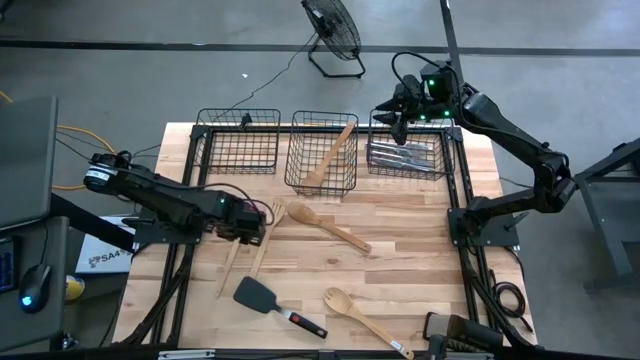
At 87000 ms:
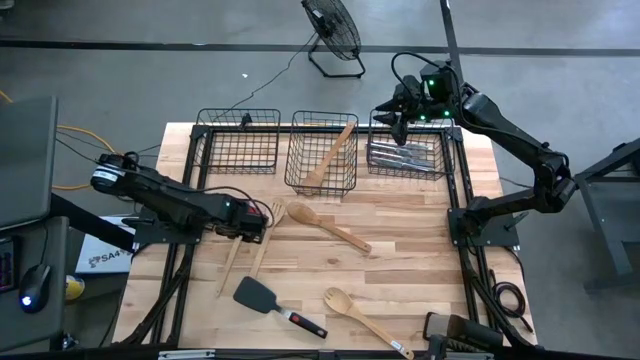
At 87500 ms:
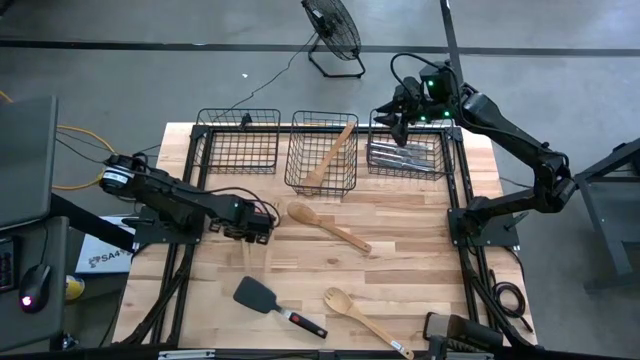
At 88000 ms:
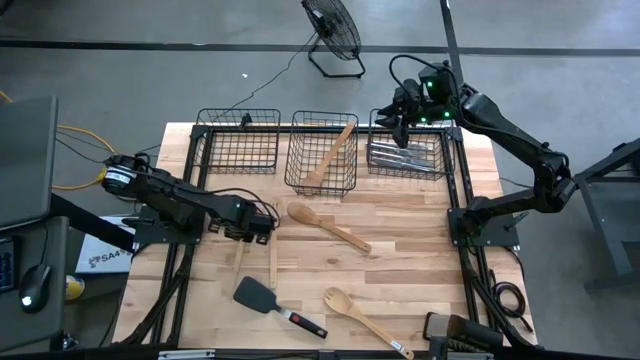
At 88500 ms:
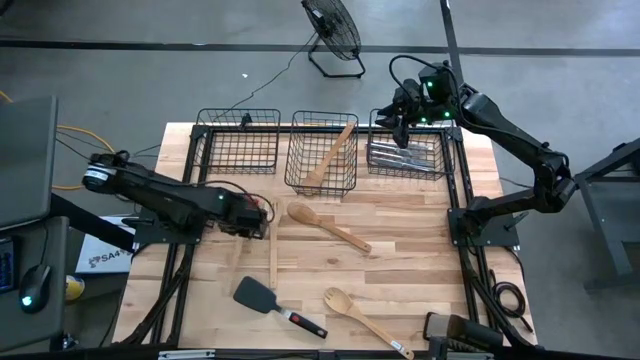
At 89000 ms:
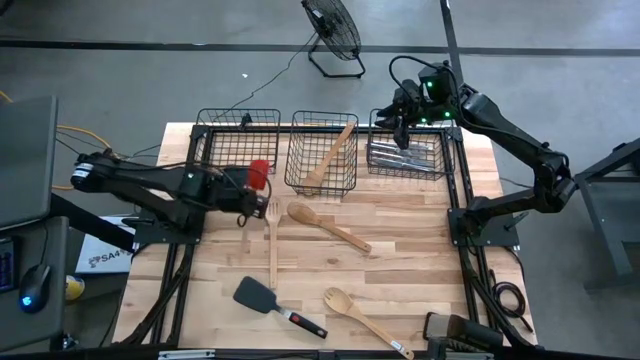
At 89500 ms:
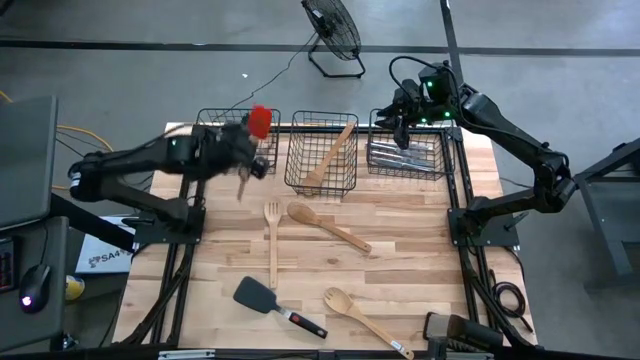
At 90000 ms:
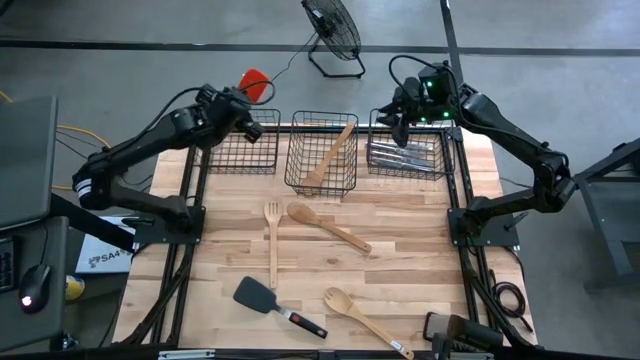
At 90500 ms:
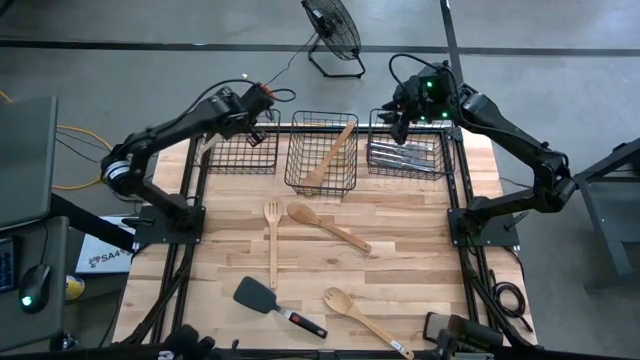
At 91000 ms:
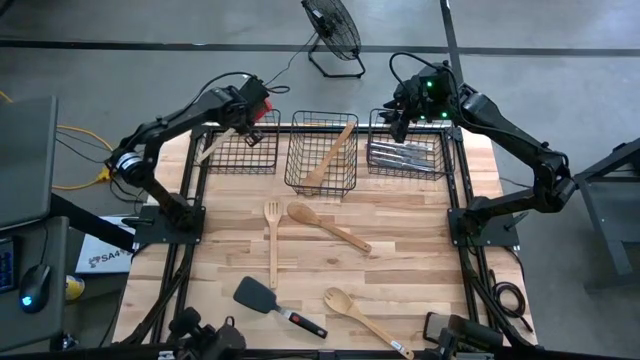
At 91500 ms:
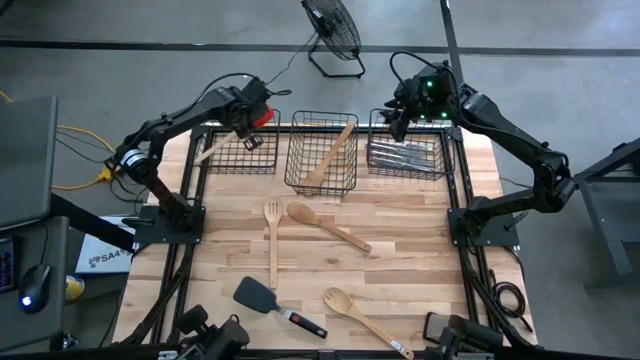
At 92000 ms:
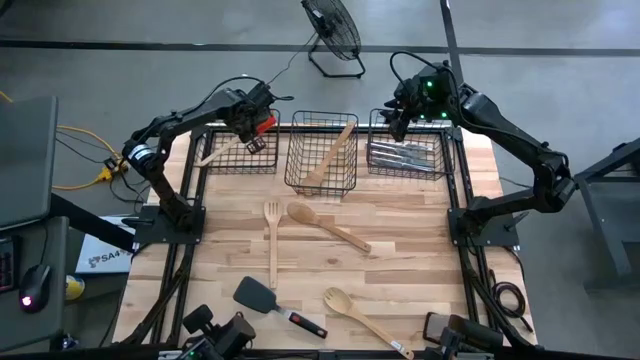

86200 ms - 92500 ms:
Task: Pick & Place Kitchen Items
Put the red spatula into the left wire basket

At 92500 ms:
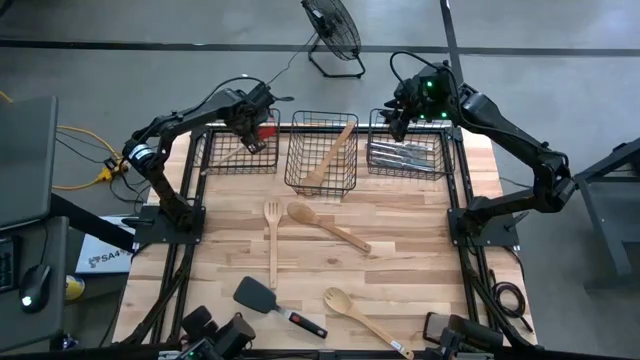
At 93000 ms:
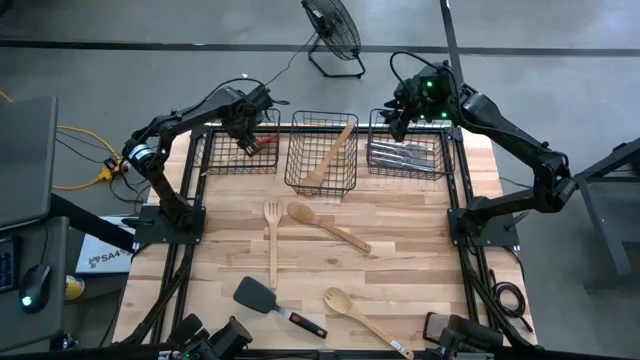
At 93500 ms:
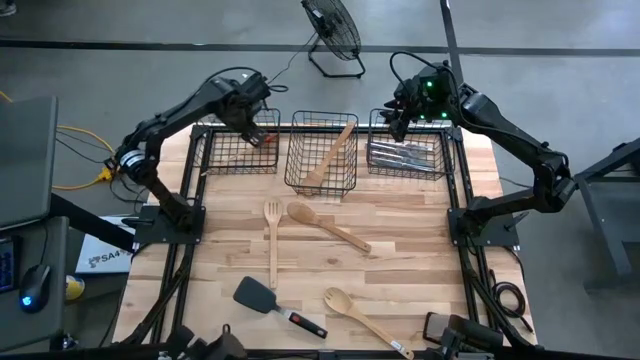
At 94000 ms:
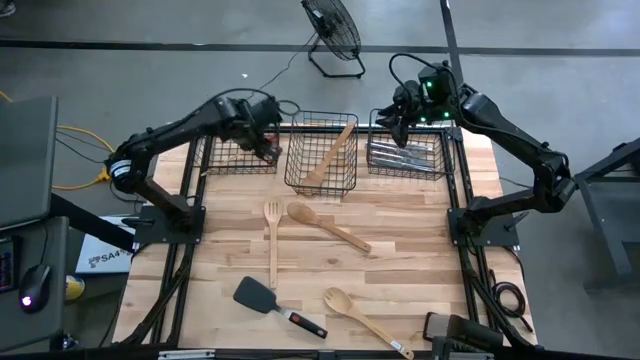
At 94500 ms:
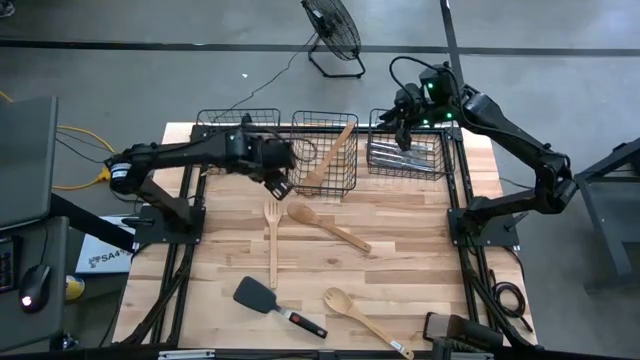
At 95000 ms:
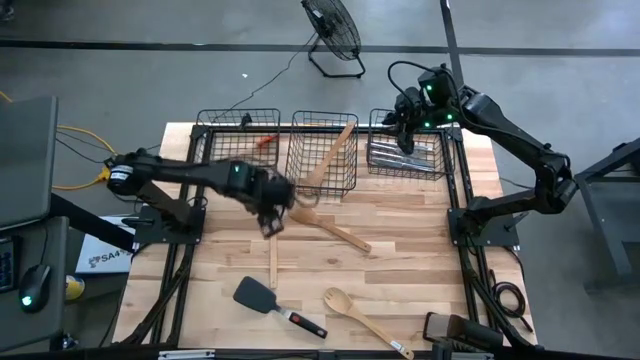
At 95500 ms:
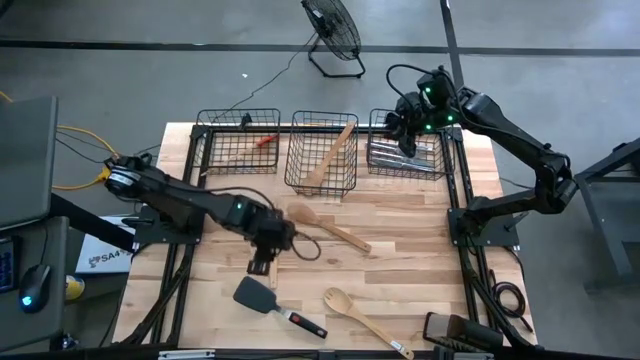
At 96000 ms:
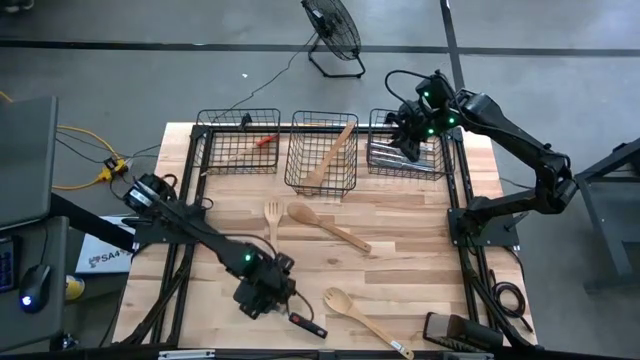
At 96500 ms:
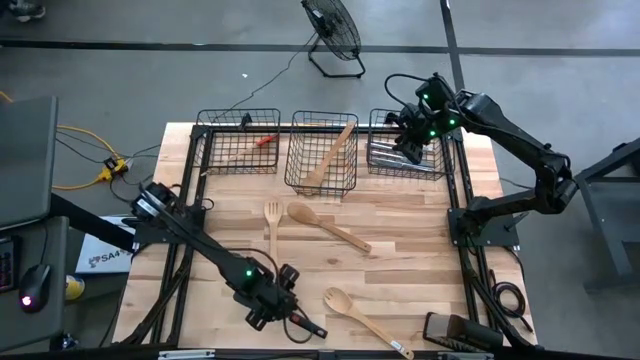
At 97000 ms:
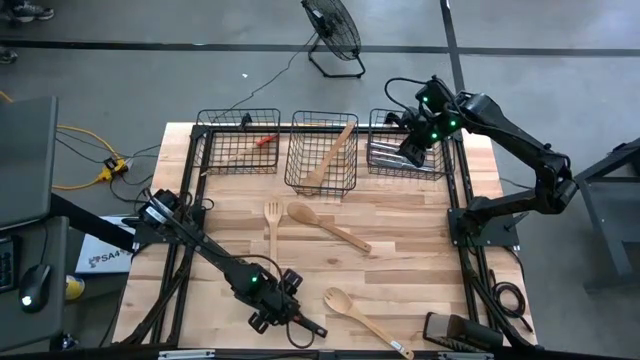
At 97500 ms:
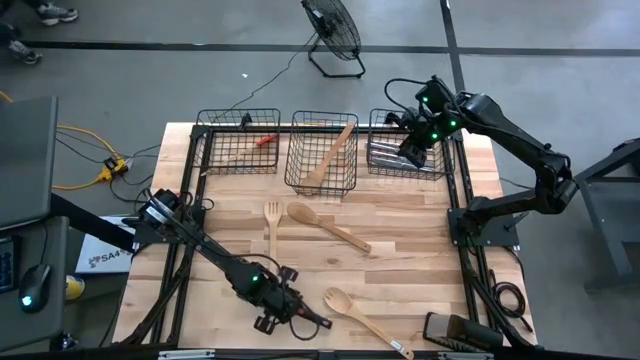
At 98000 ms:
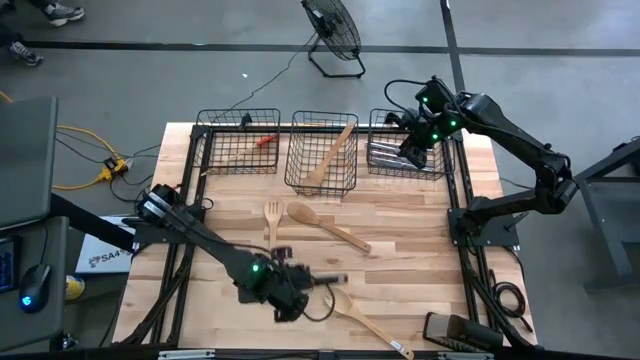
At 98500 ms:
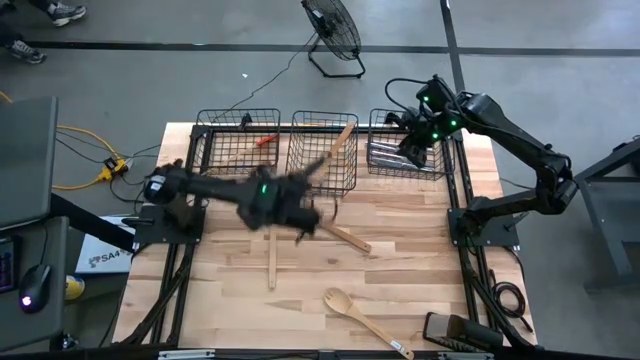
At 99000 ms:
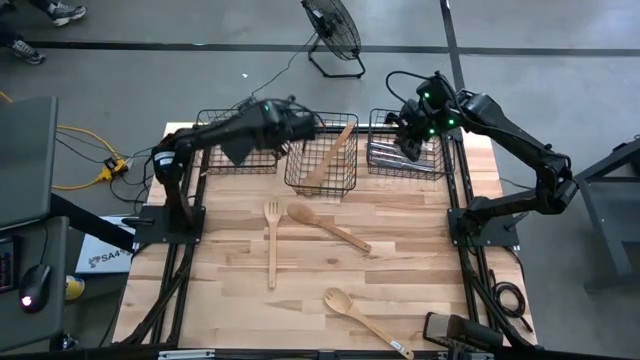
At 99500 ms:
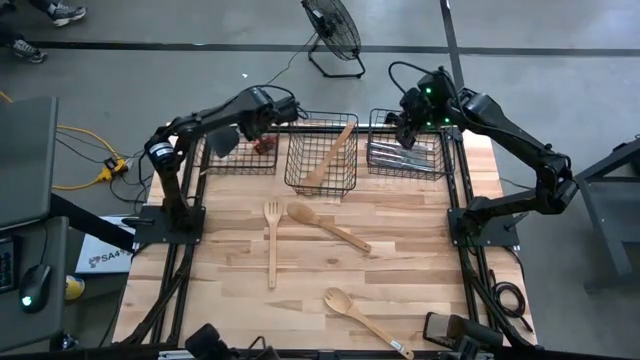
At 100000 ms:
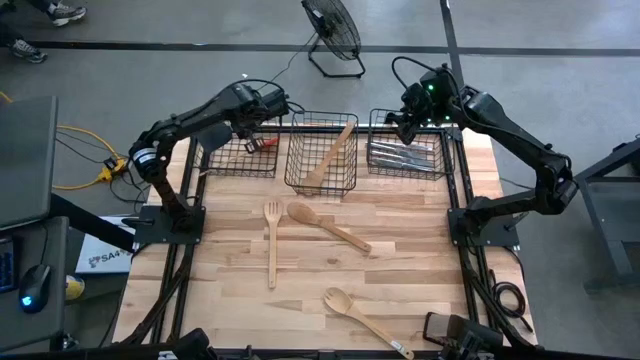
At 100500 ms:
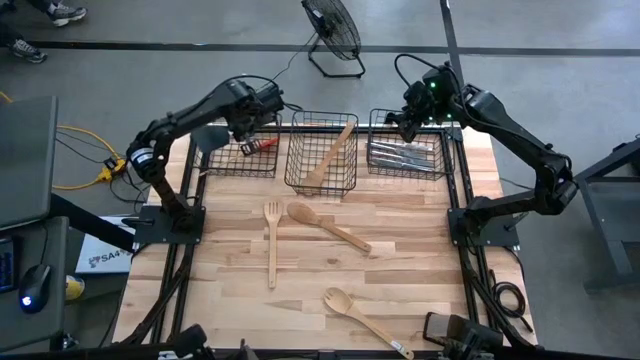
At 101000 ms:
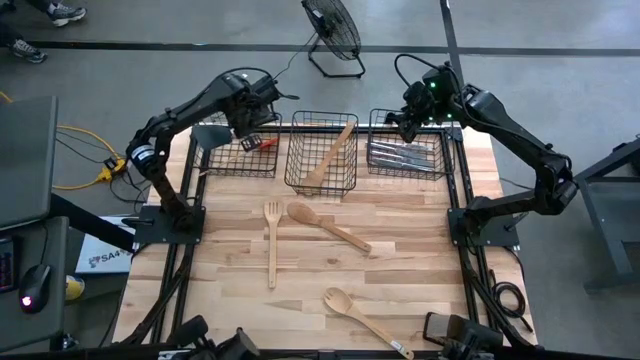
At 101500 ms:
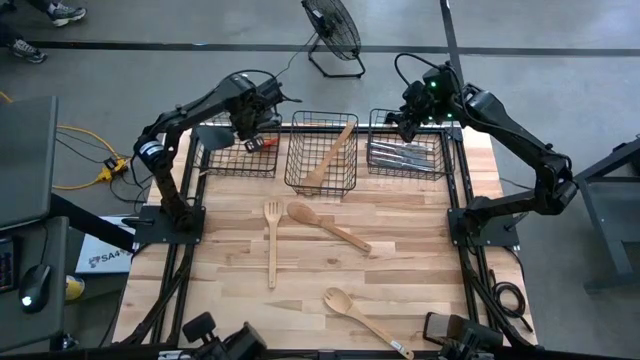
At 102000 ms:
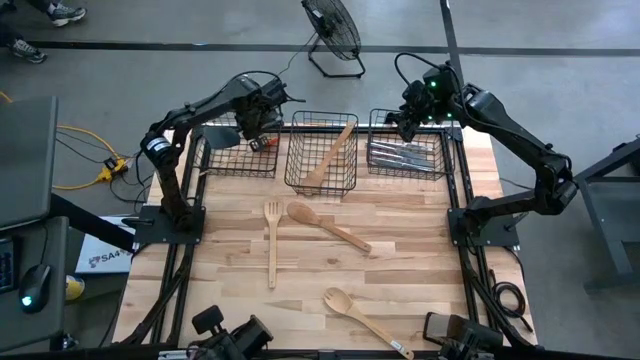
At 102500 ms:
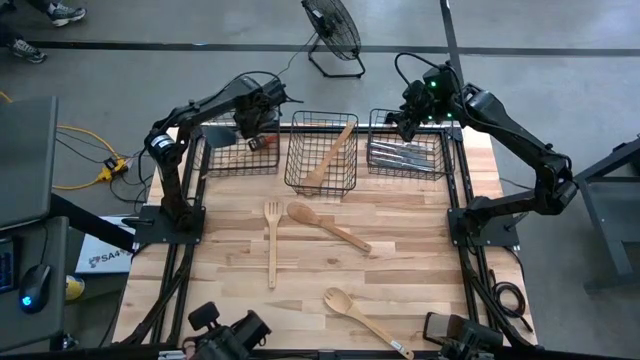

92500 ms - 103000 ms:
Put the black spatula into the left wire basket

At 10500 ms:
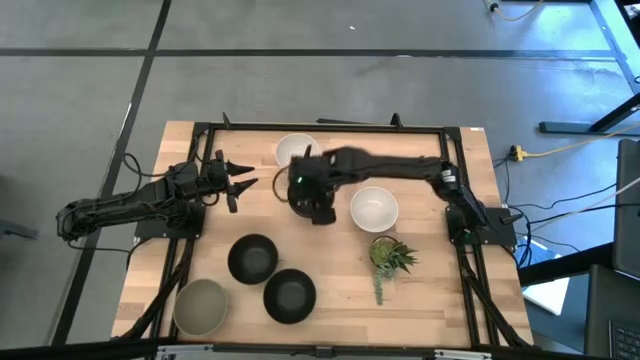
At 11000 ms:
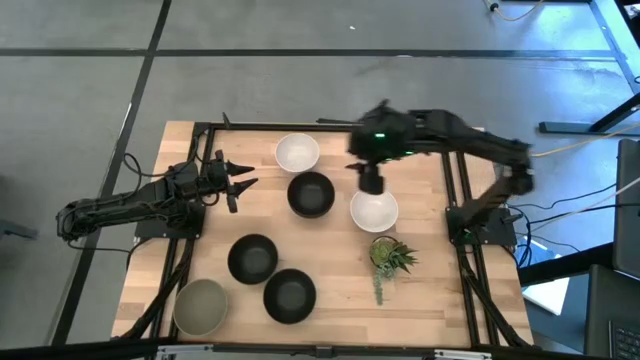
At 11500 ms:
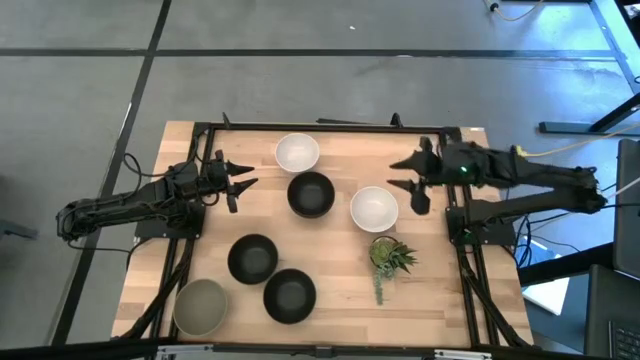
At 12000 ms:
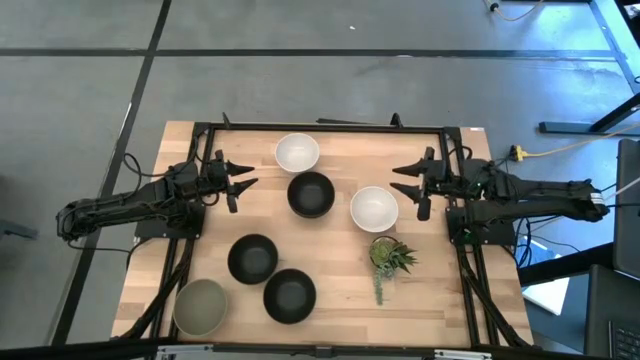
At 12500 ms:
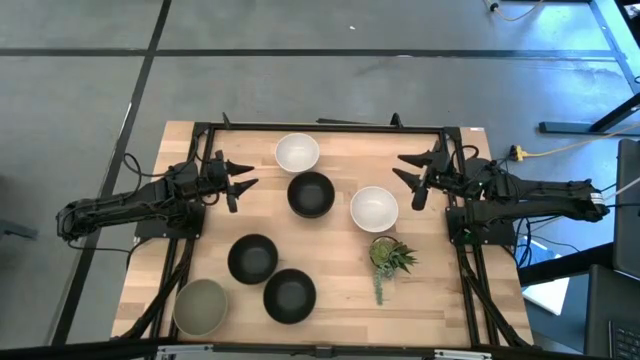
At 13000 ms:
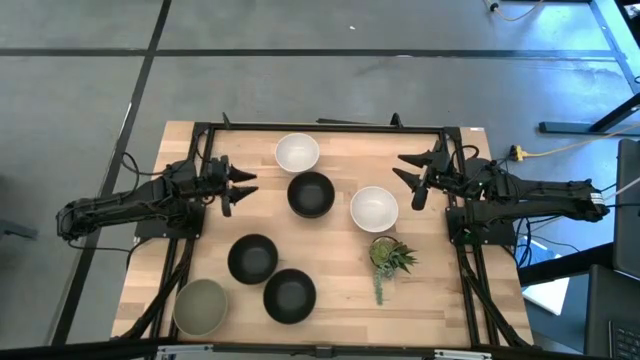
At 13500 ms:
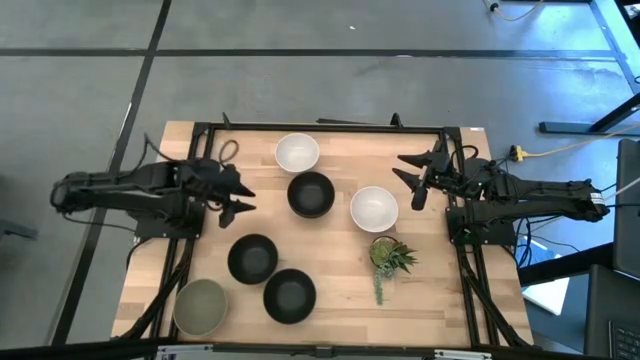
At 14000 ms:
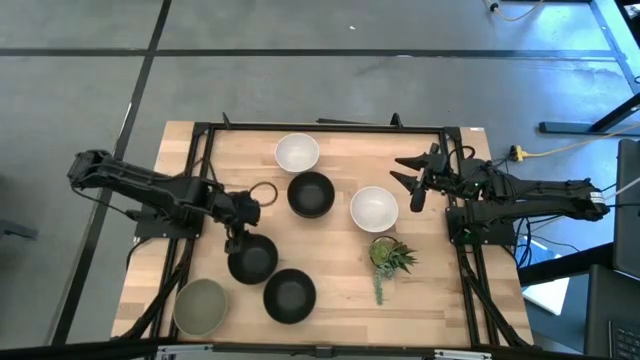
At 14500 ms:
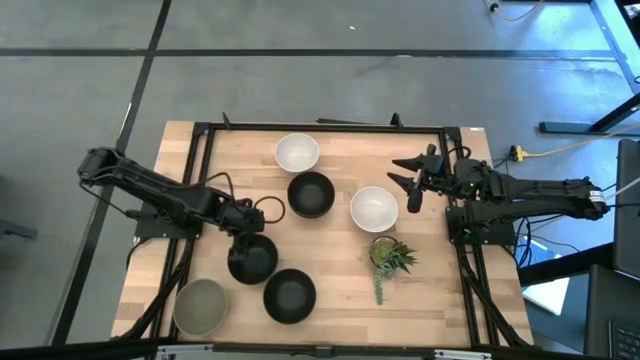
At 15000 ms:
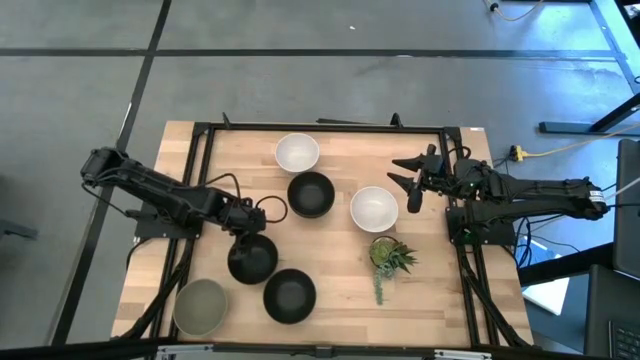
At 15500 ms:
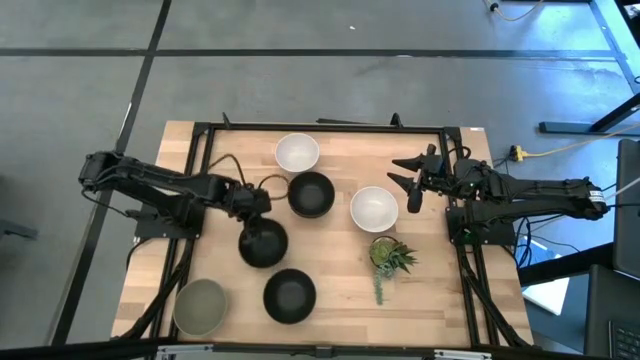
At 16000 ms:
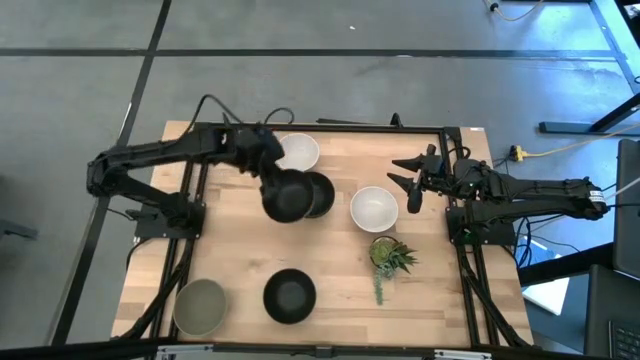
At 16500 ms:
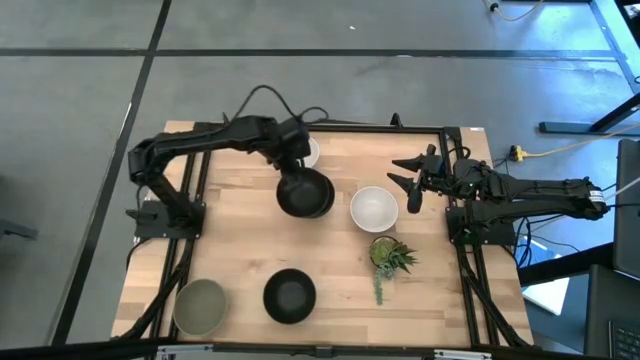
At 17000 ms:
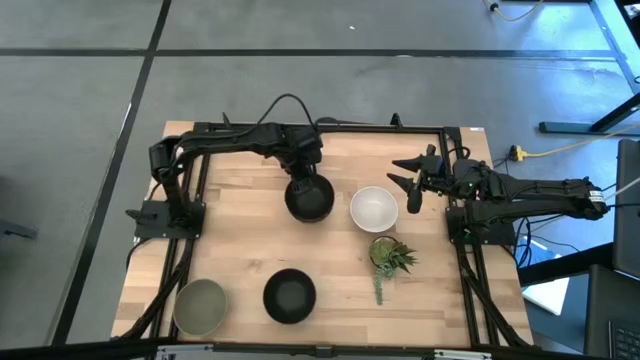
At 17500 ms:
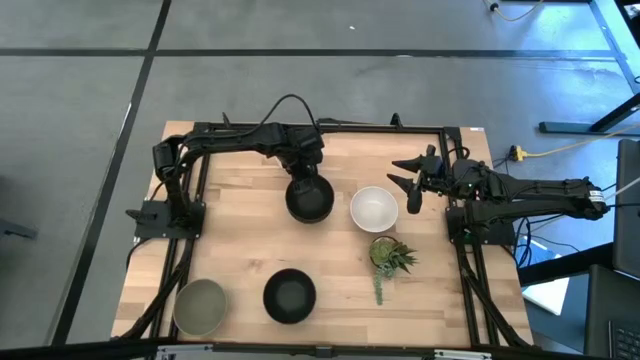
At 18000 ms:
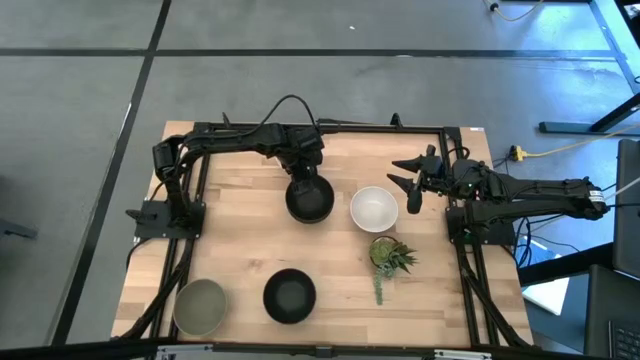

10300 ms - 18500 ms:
Task: Nest bowls inside each other
Stack the middle black bowl on top of the other top black bowl
